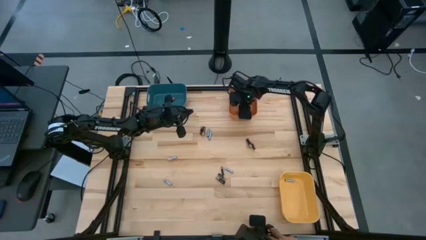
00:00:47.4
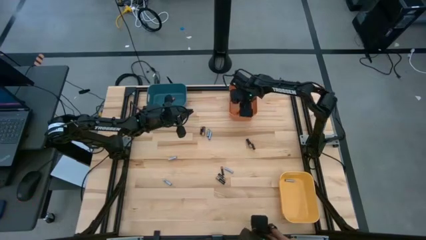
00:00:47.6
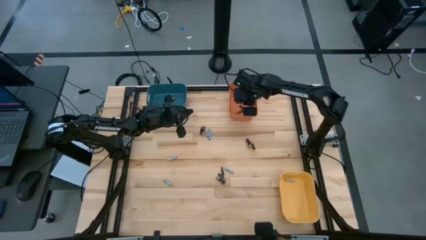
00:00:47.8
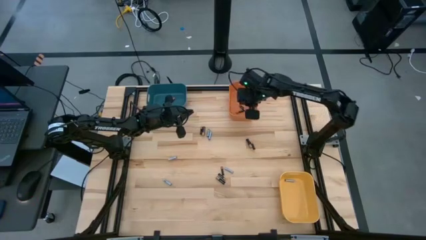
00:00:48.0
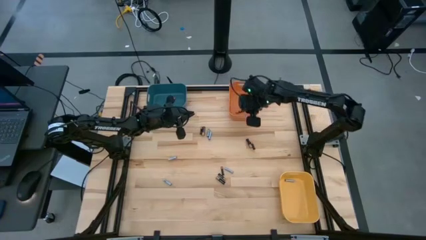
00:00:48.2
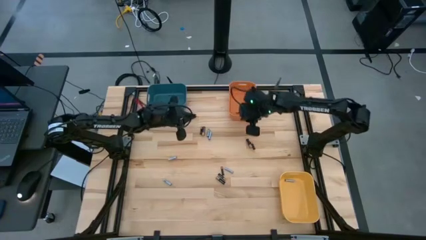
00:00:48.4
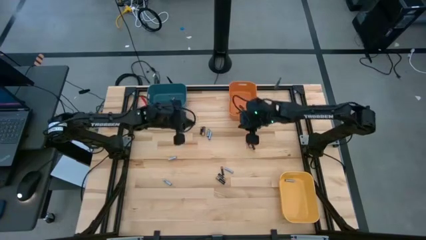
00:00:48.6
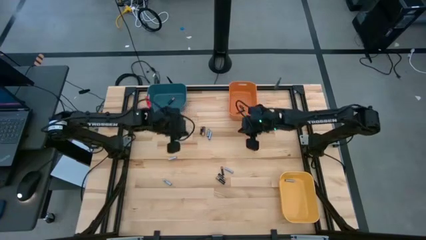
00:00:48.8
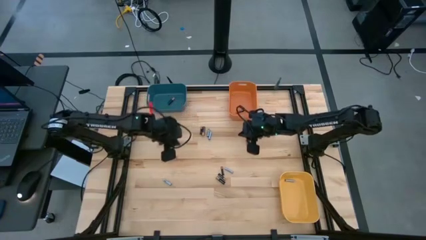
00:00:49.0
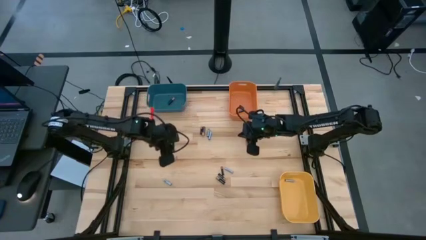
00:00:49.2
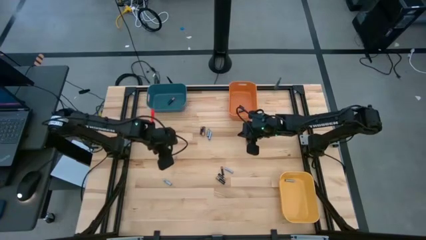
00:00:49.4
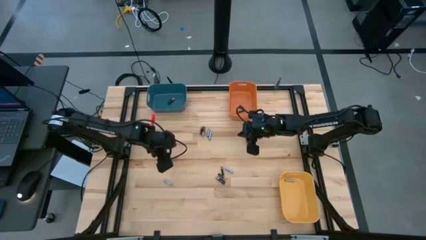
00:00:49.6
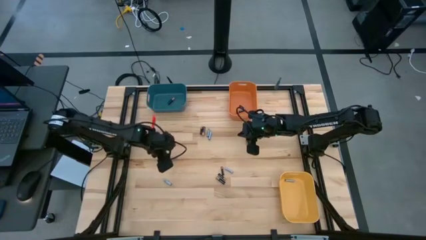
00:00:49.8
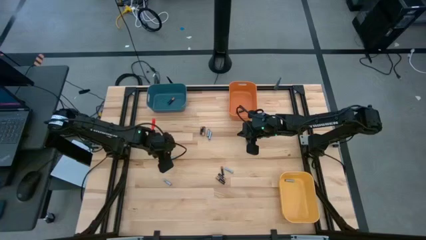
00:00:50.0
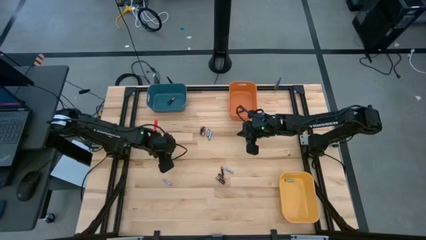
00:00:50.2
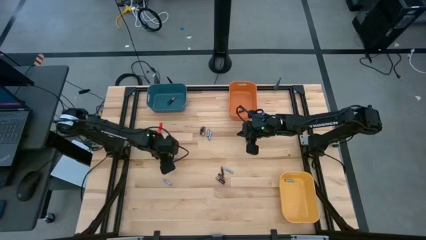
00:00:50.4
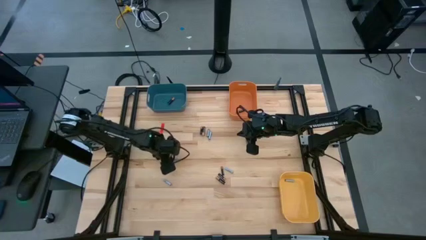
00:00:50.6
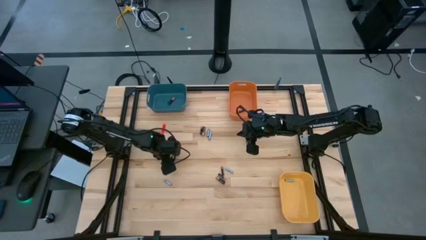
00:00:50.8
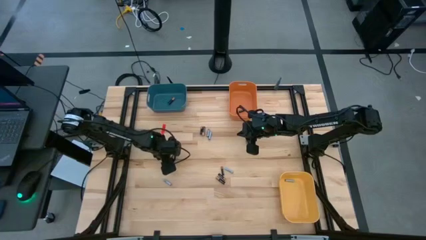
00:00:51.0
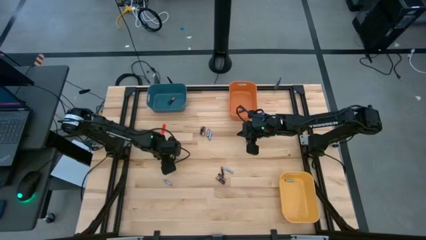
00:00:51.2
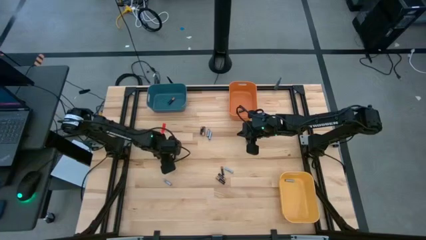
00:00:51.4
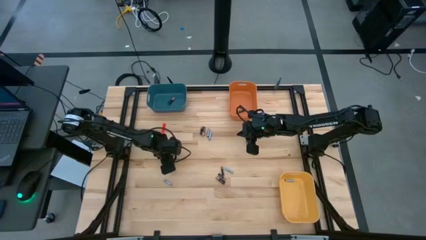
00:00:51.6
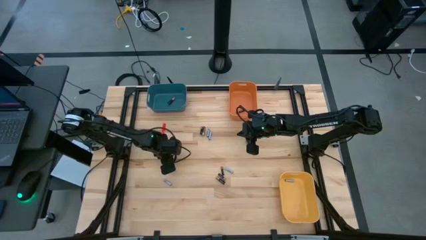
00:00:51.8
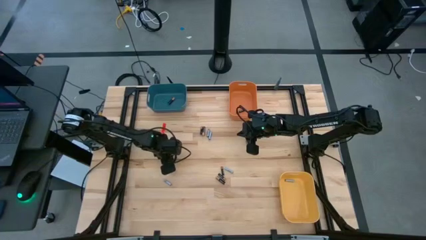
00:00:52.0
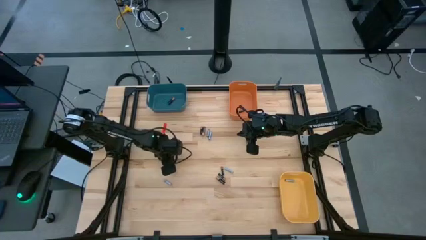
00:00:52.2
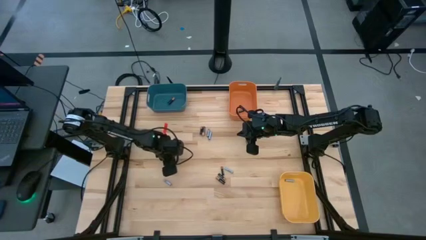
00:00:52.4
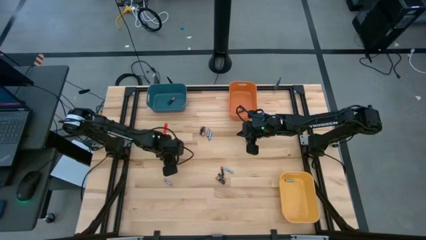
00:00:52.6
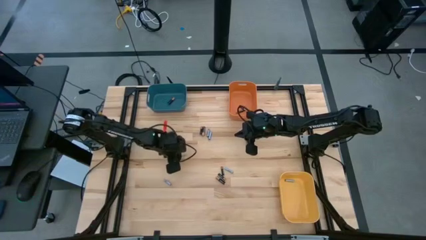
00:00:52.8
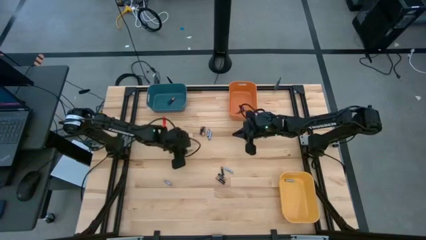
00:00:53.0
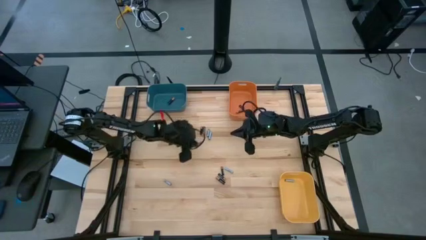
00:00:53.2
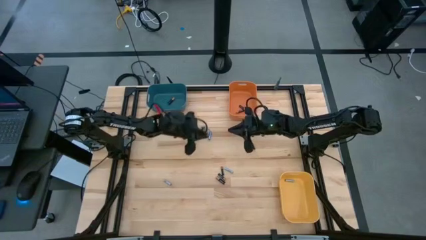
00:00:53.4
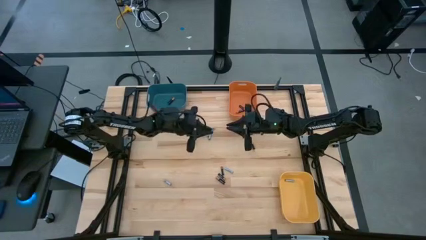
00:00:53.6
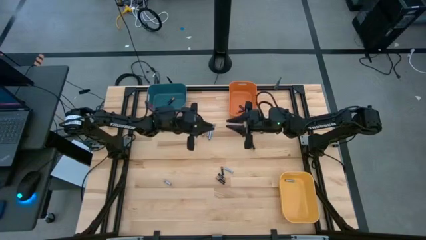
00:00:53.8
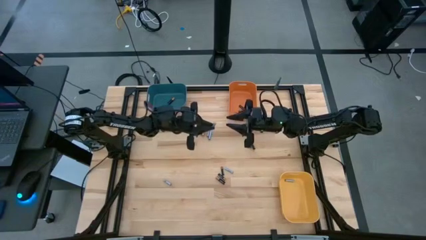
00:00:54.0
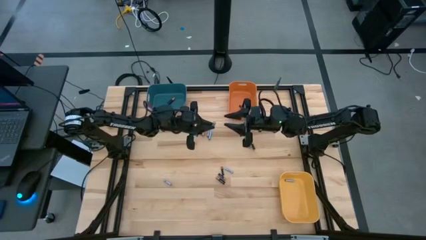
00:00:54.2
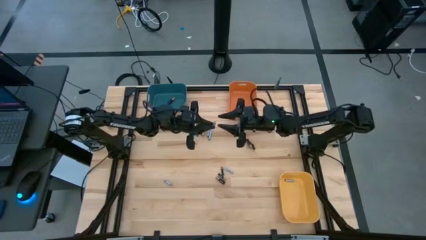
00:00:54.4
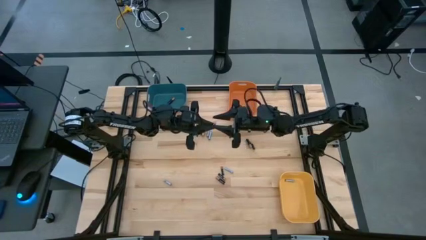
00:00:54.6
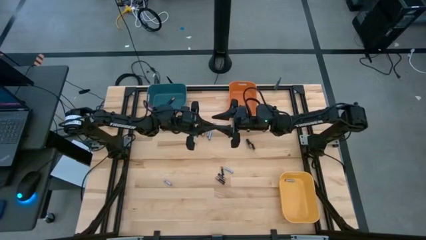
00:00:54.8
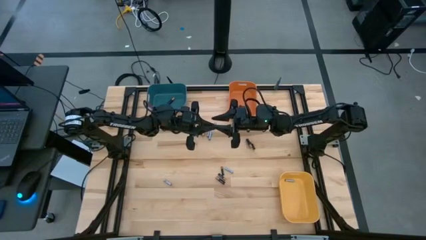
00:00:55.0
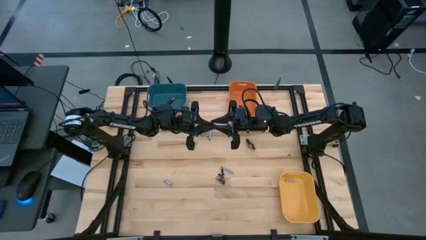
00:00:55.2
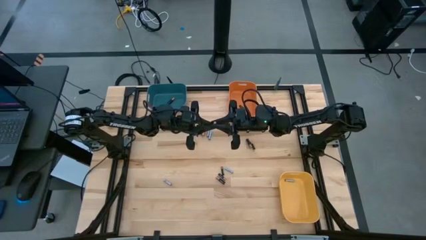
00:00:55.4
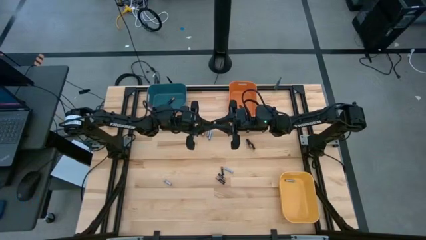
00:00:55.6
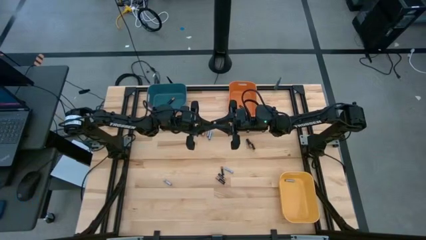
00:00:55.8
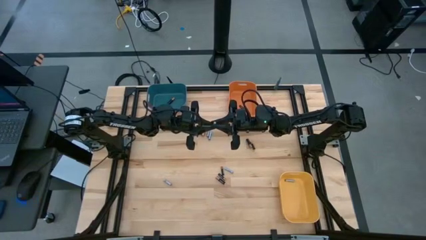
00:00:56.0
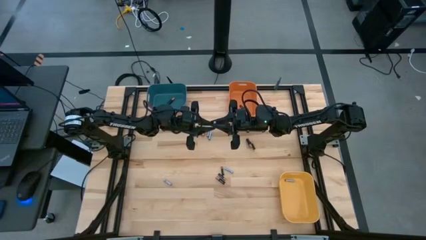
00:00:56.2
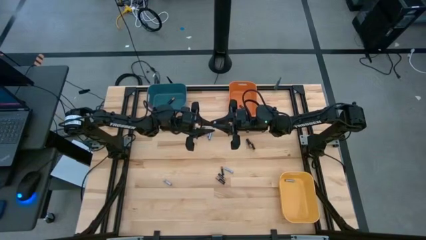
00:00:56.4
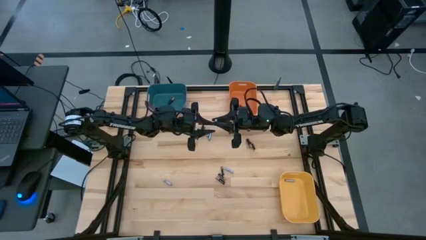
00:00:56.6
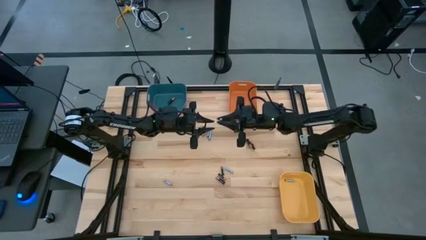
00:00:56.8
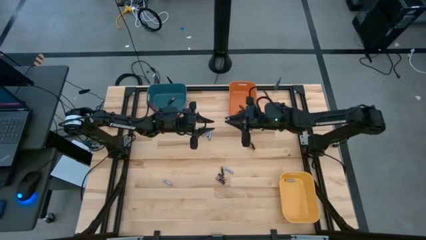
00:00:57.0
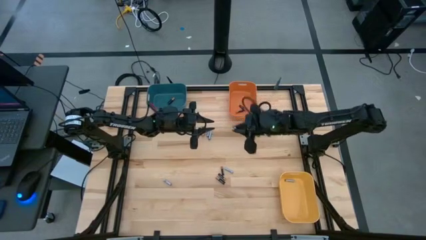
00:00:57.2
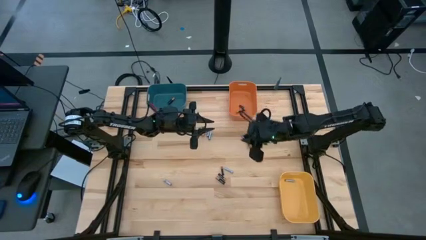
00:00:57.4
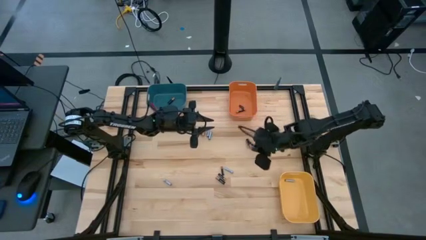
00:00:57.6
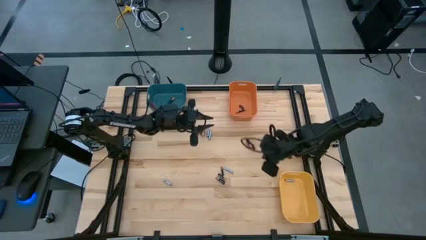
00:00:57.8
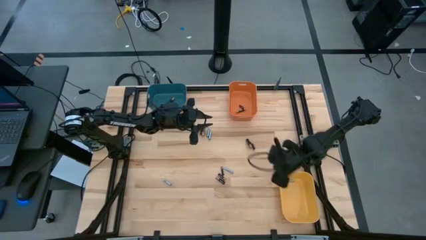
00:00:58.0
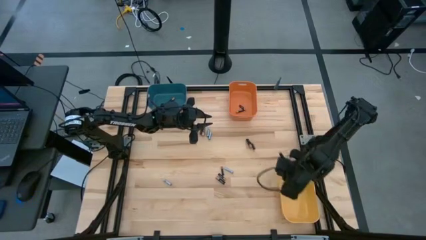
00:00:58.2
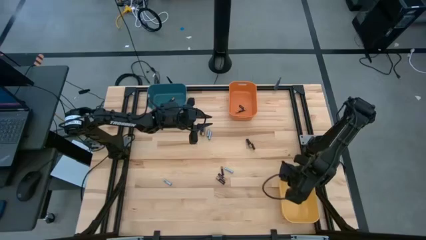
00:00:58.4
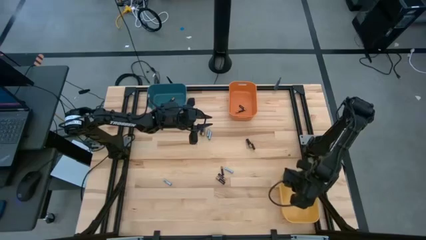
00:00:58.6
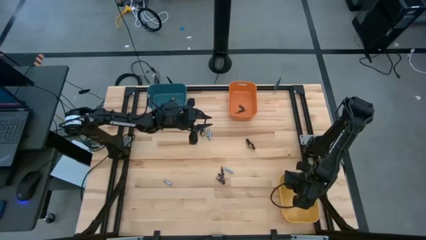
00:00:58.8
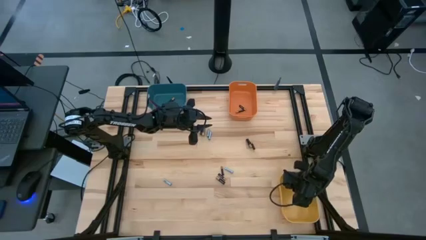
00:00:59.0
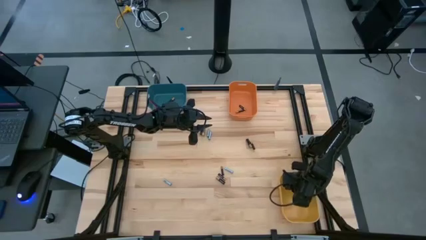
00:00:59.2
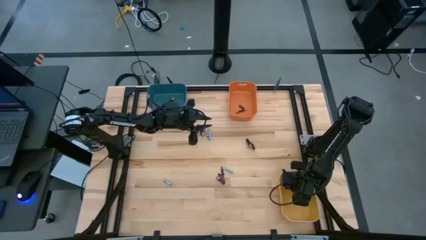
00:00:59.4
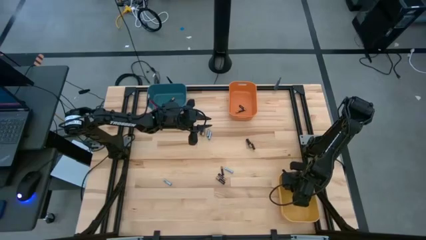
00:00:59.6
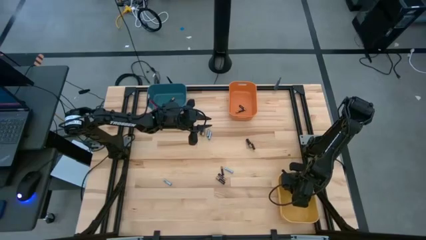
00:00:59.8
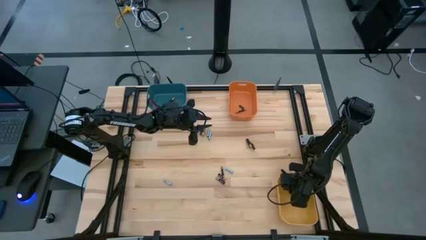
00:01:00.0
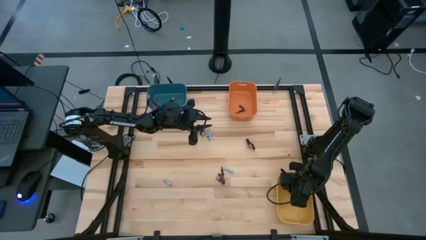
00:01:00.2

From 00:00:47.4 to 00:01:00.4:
Task: Sort batteries
Put the silver battery into the yellow bin
